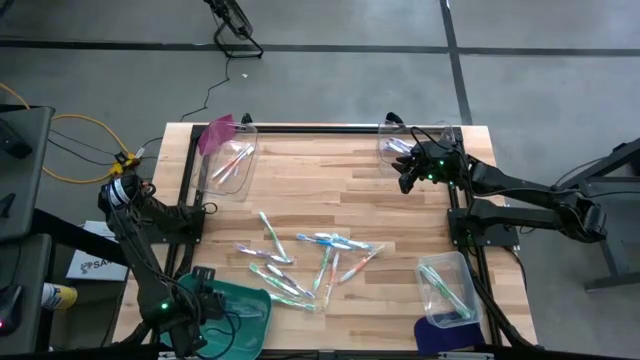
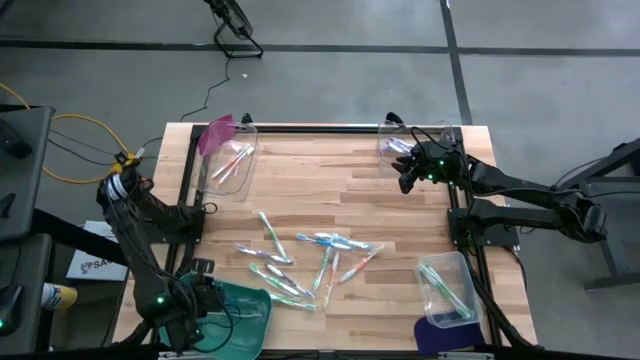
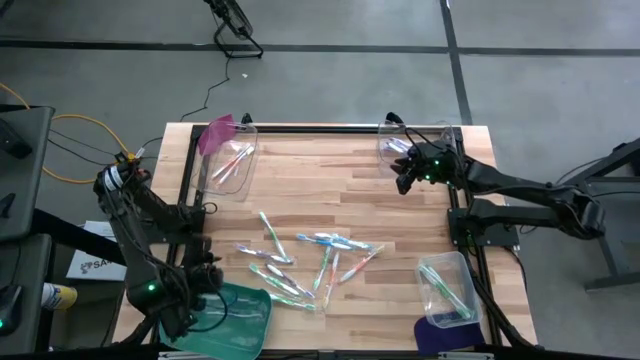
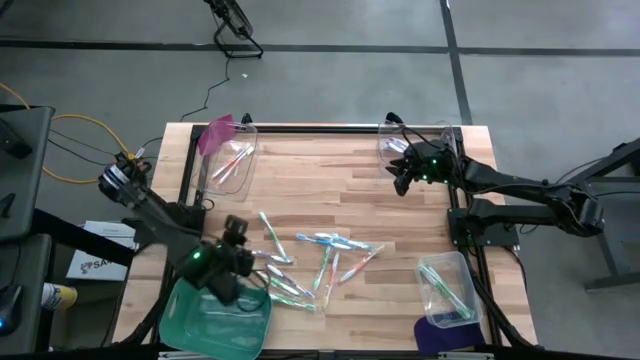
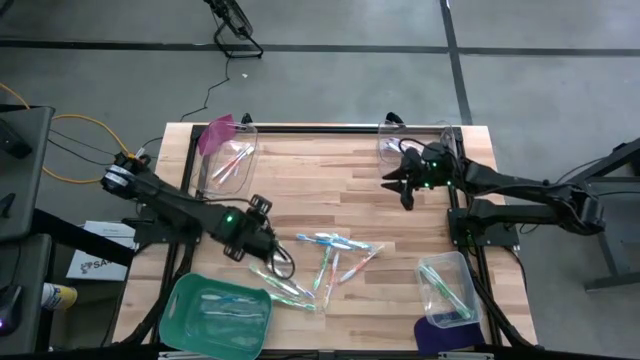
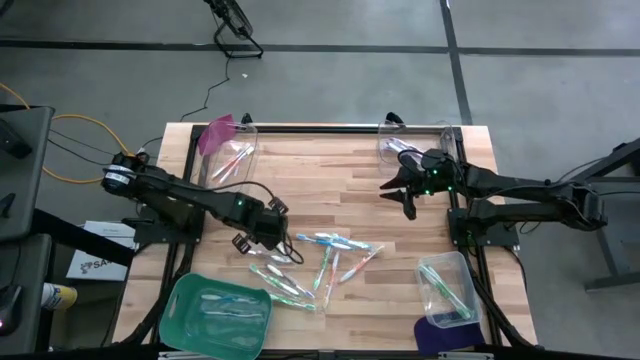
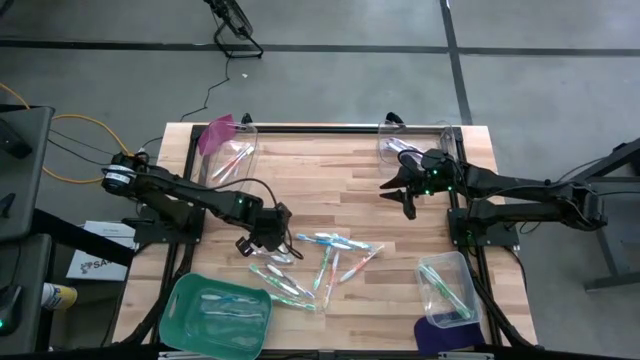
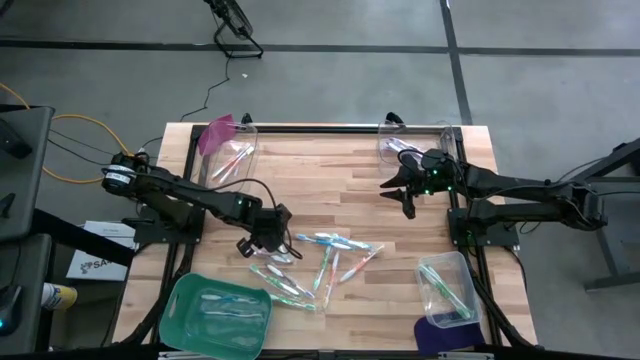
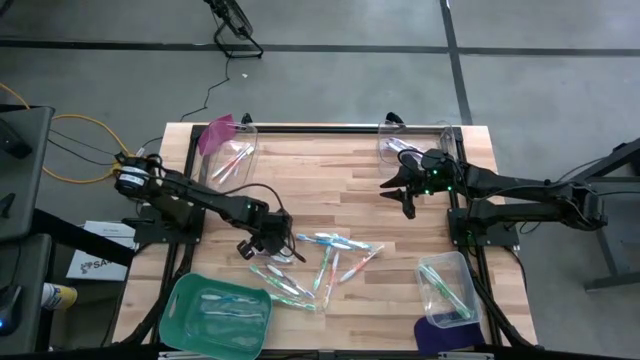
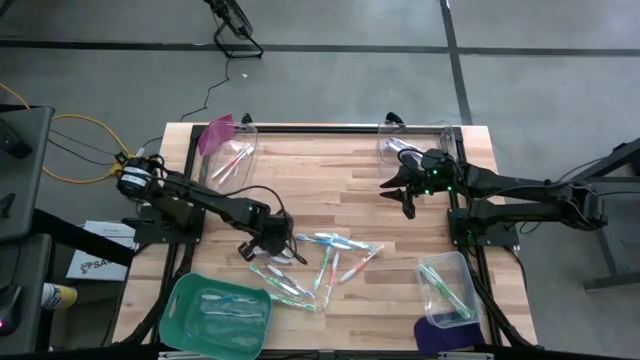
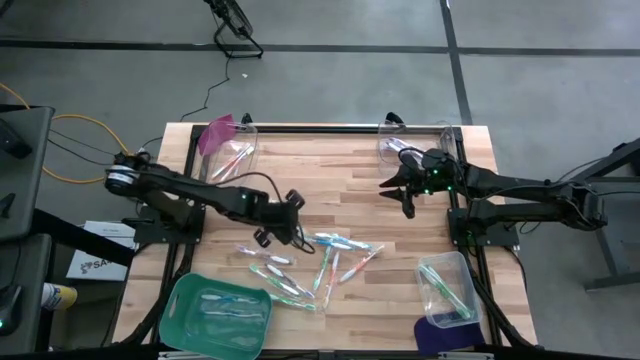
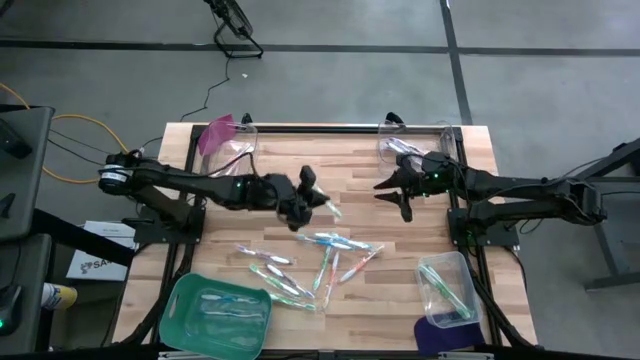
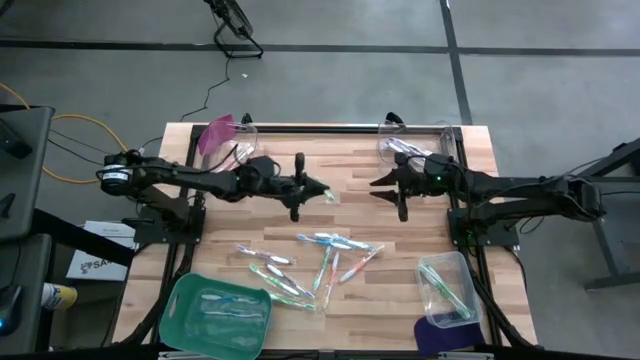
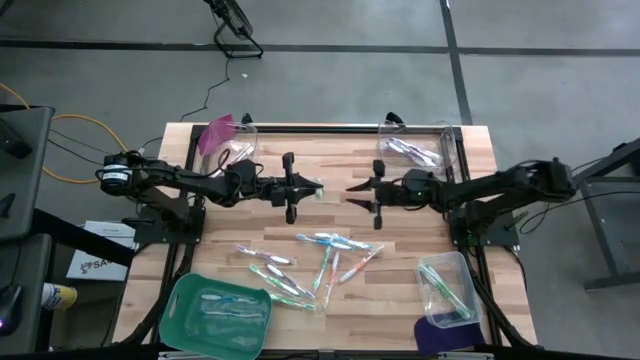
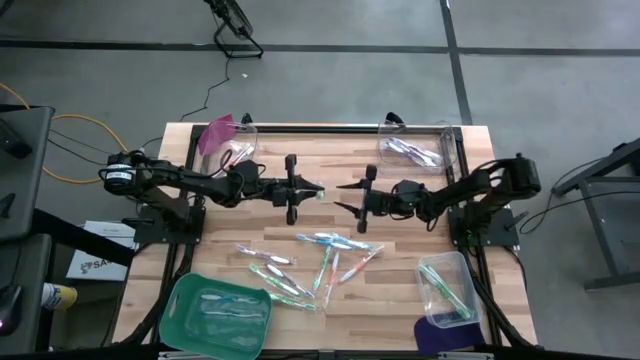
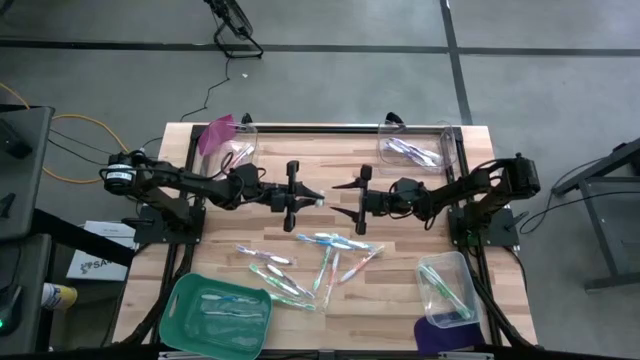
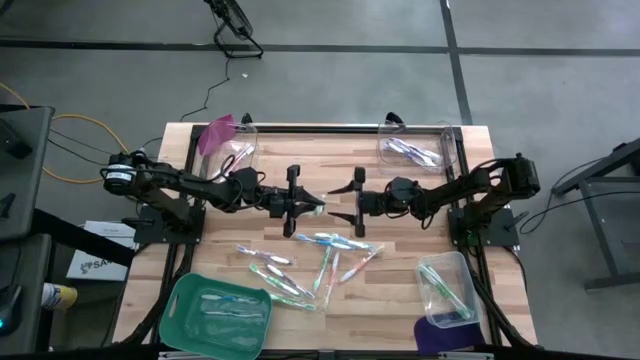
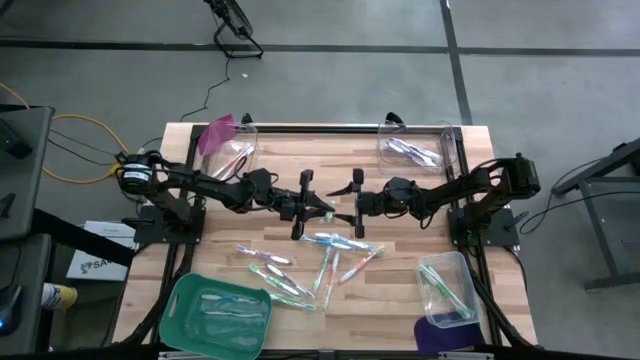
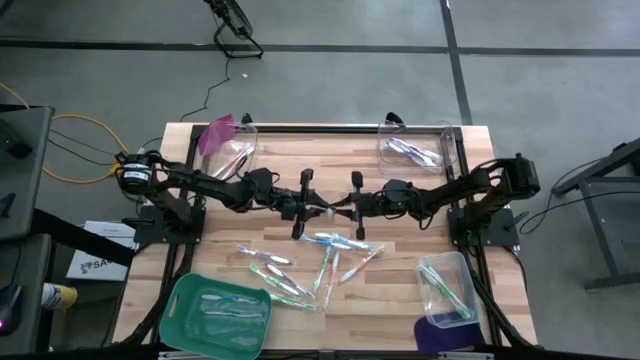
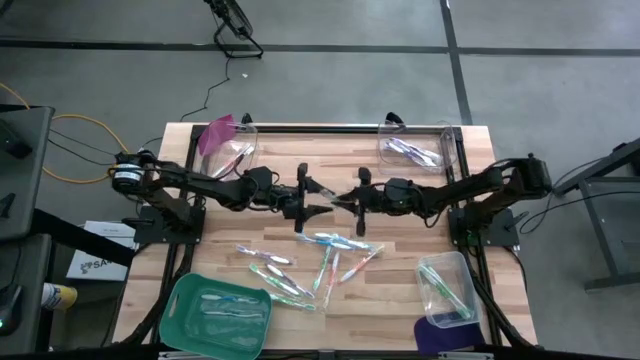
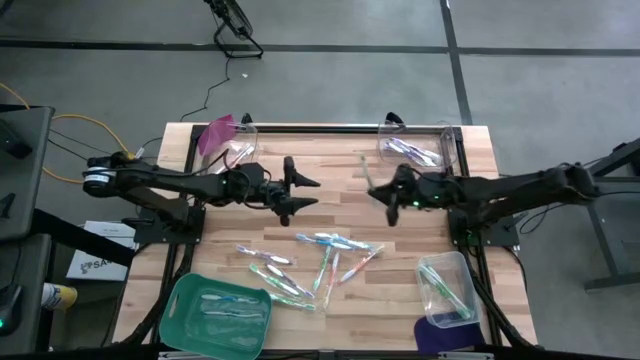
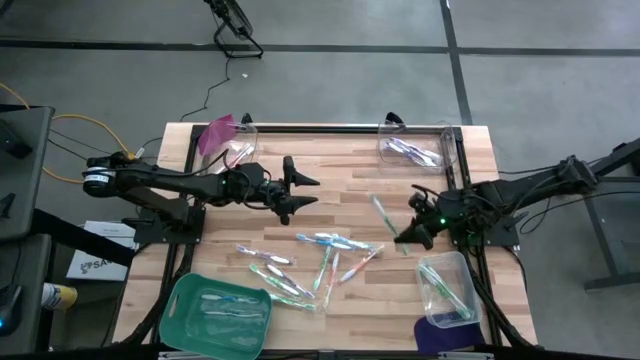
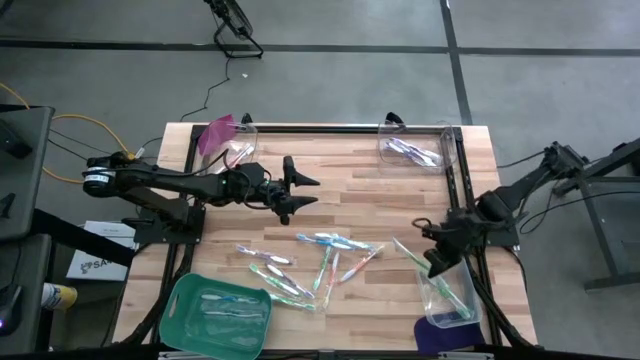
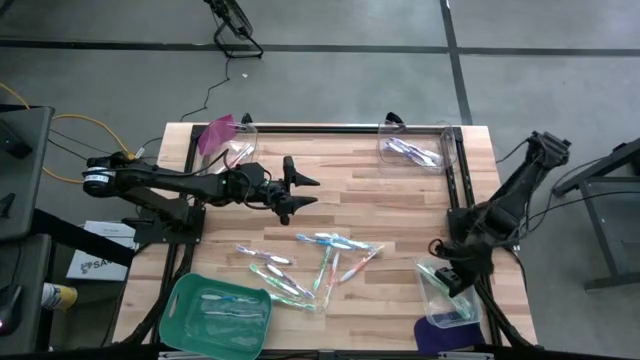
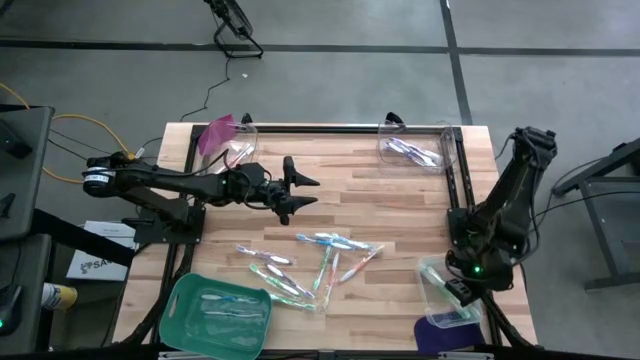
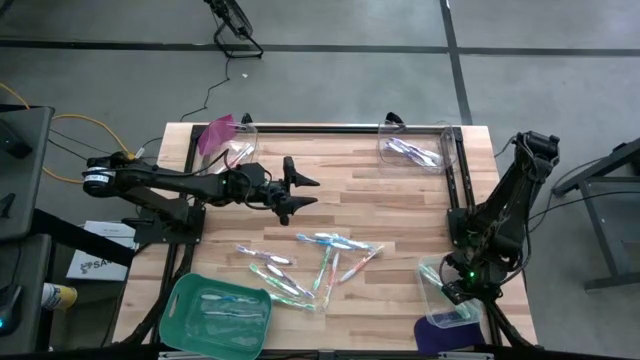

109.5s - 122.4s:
Task: Pick & Place Toothbrushes
Put the green toothbrush into the white bin

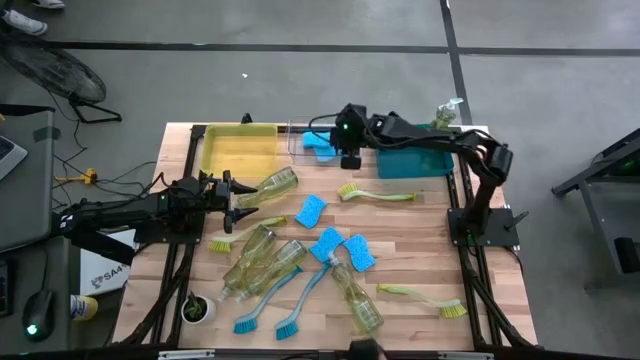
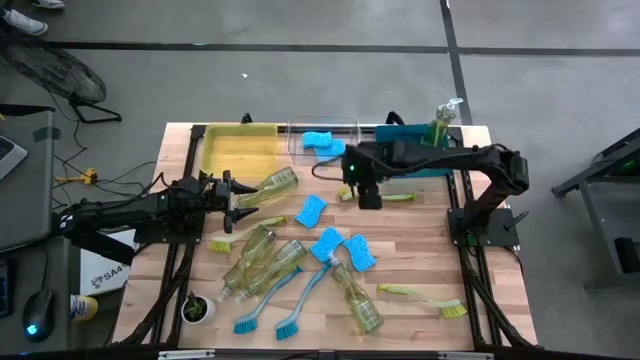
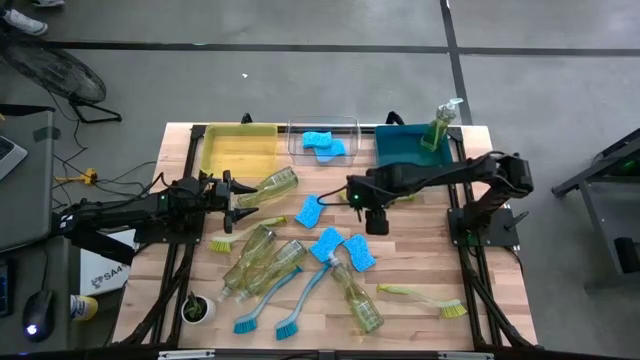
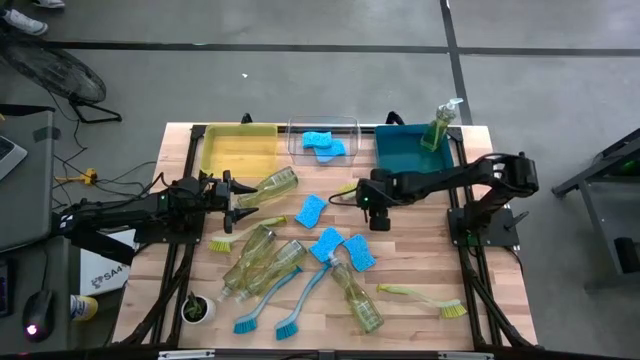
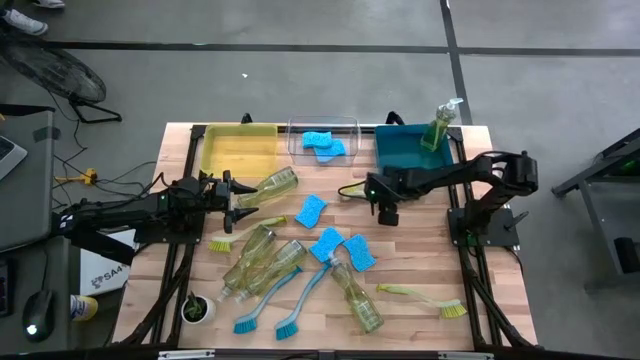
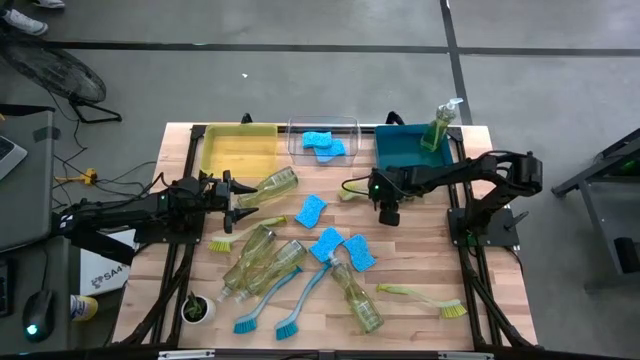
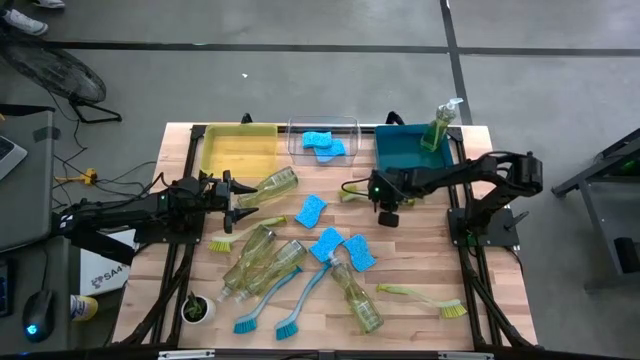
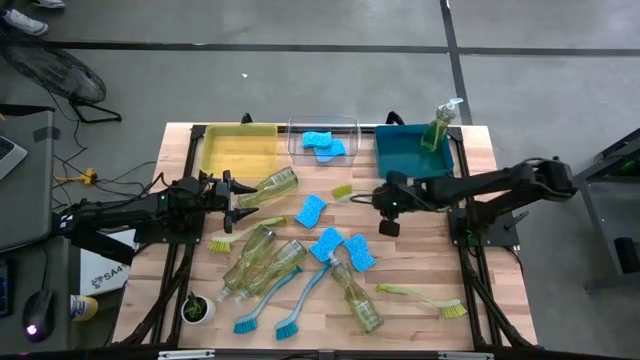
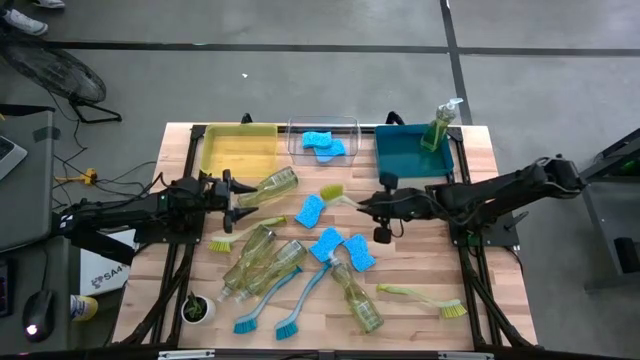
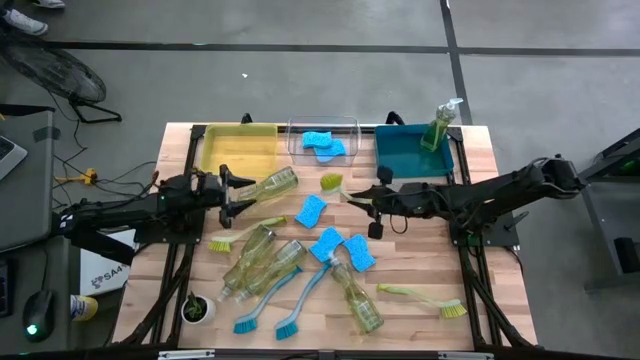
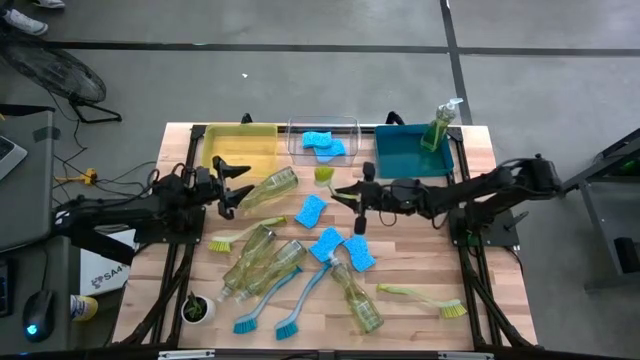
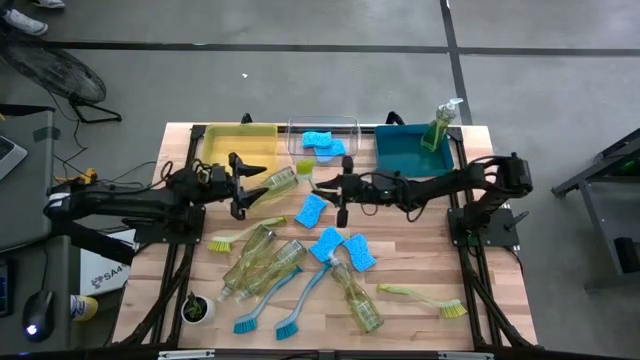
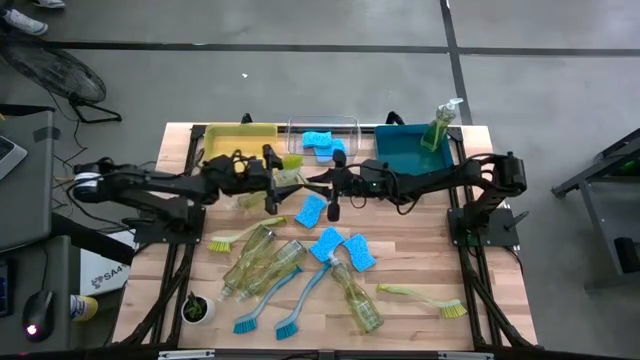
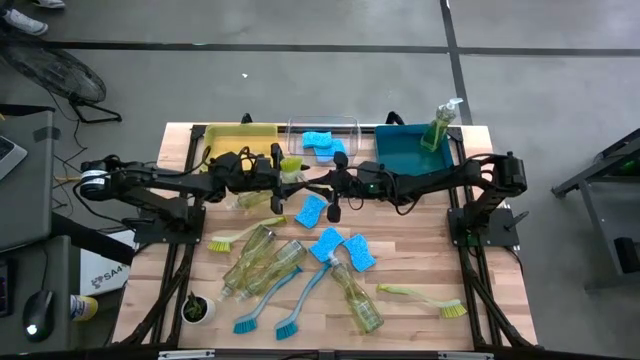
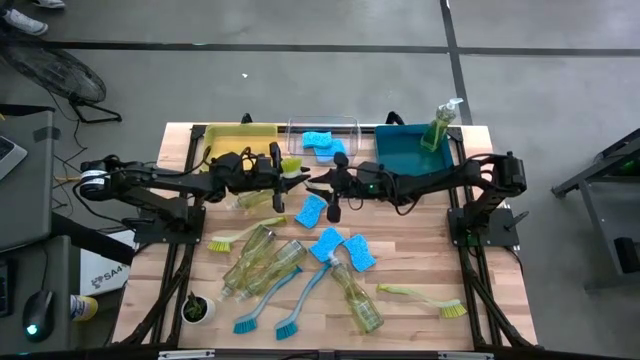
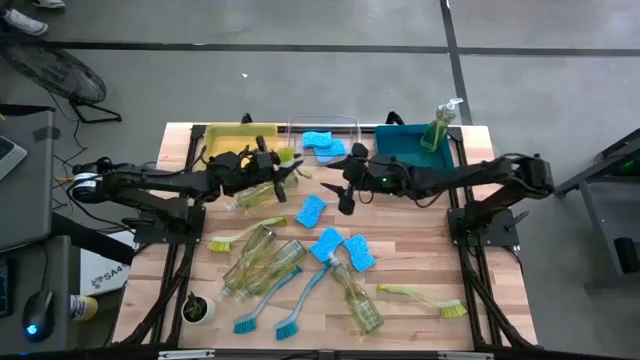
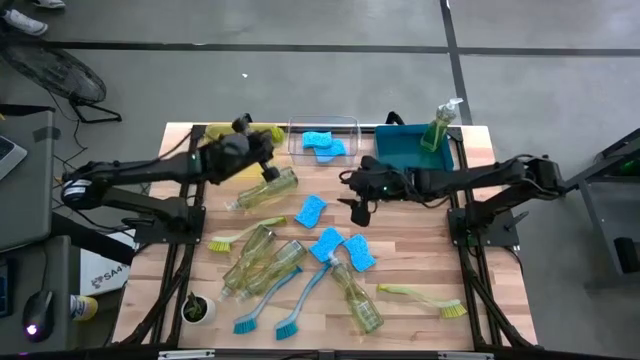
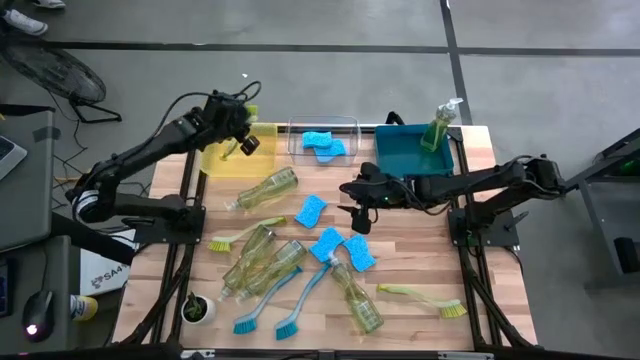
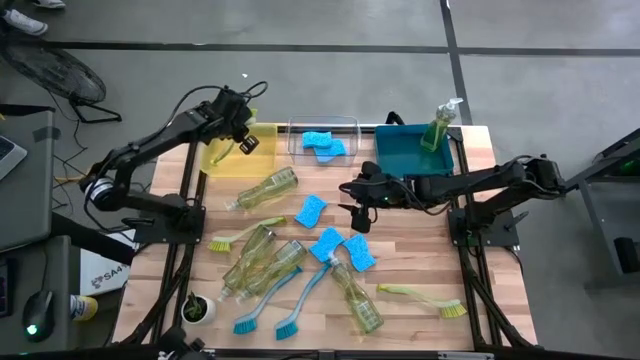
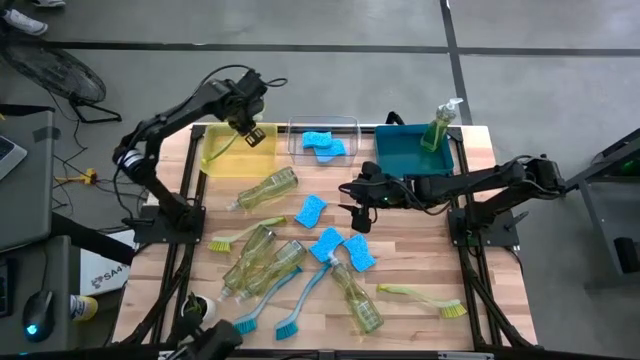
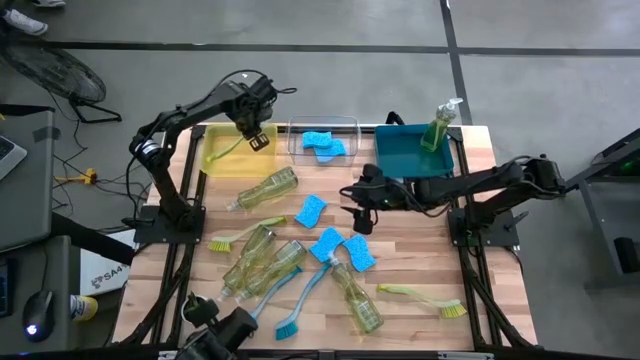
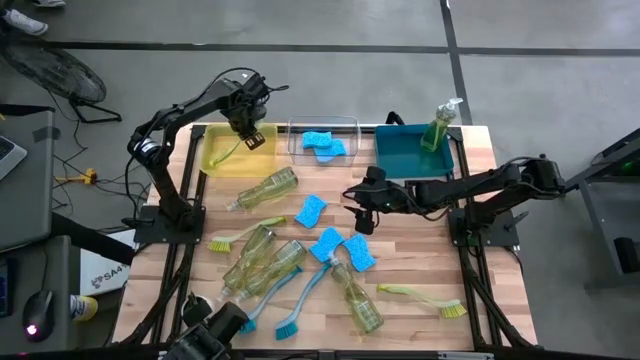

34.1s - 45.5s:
Task: Pick & Place Kitchen Sink Supplies
Put the top right yellow dish brush into the blue bin
